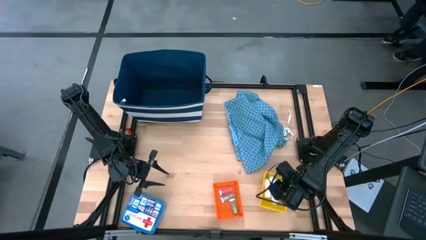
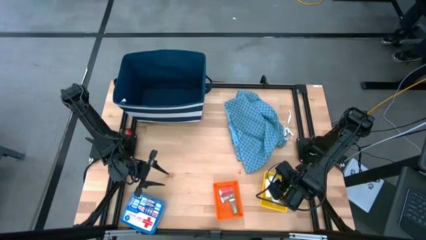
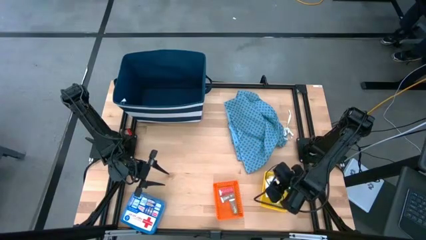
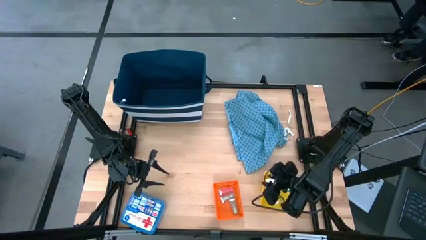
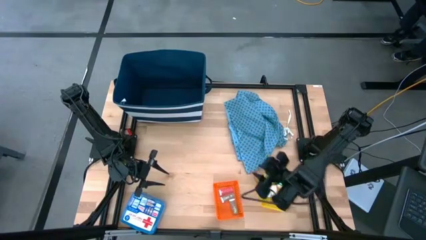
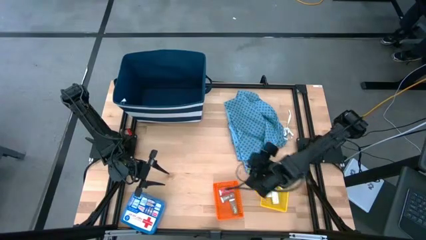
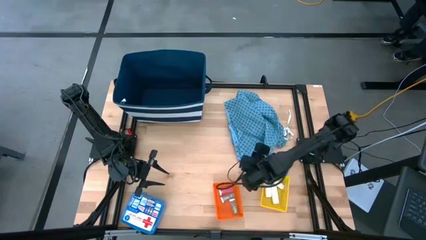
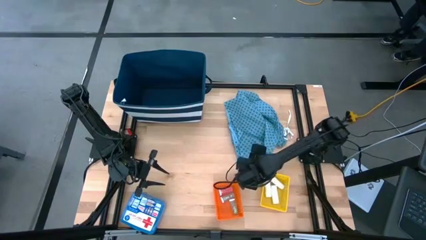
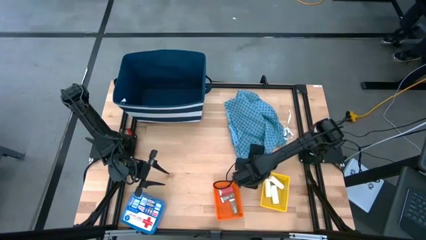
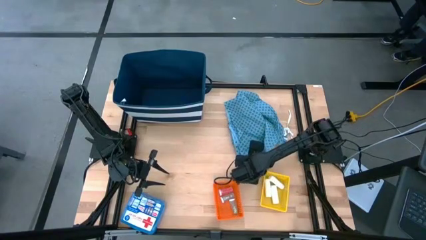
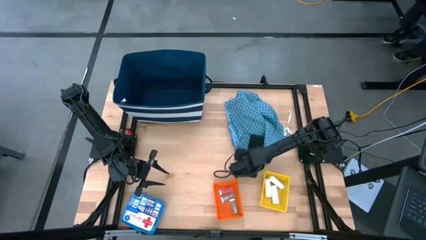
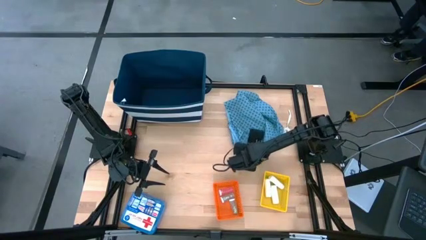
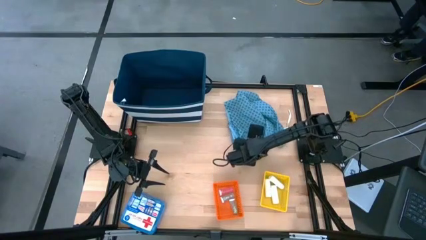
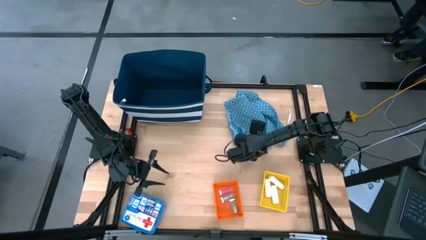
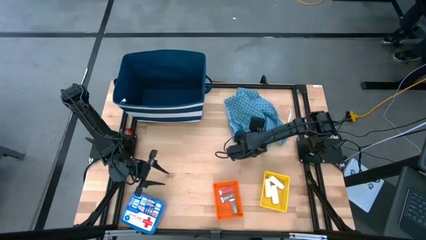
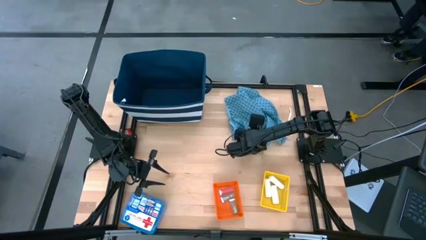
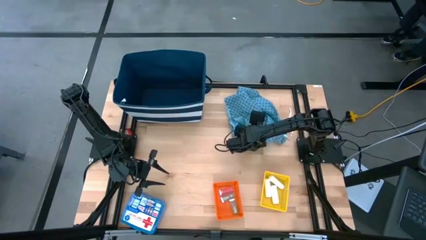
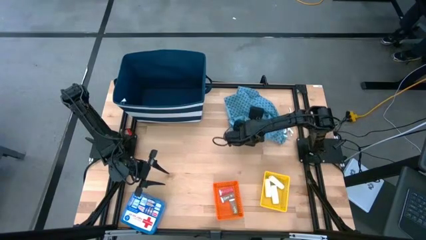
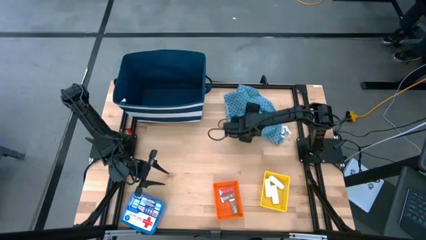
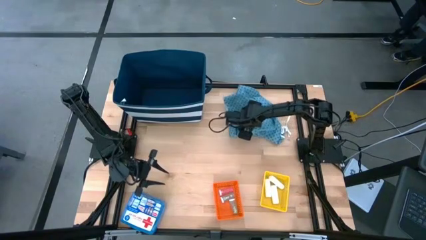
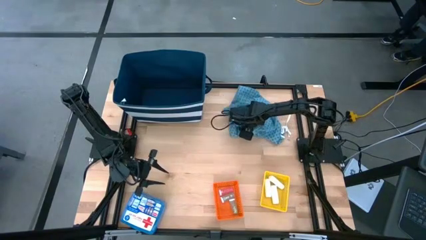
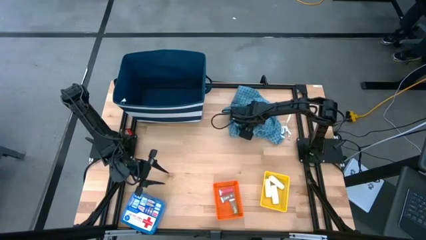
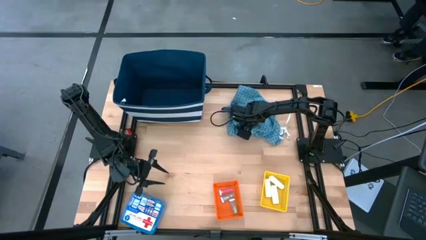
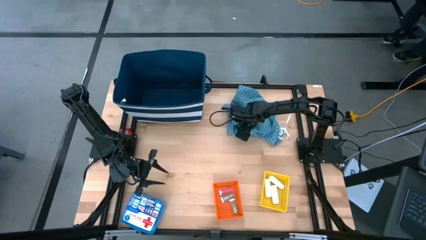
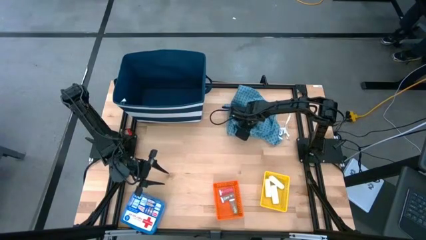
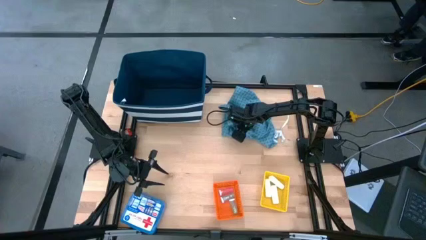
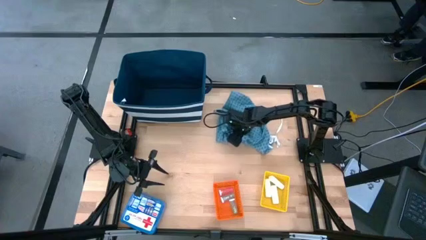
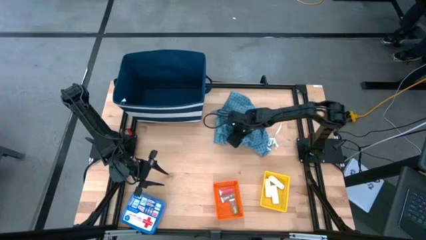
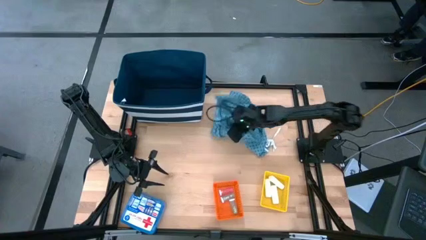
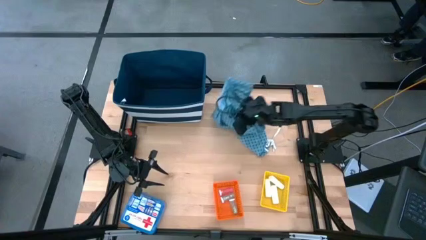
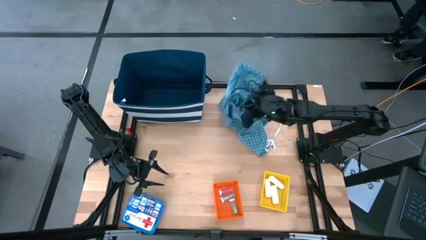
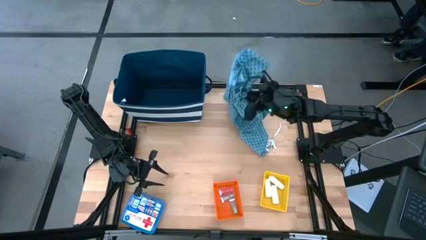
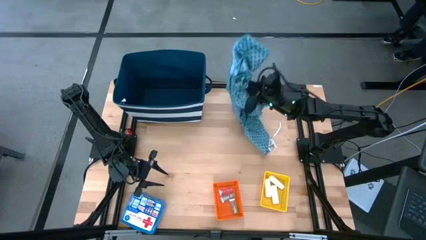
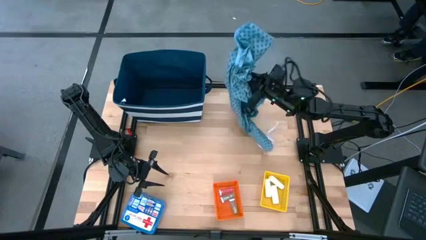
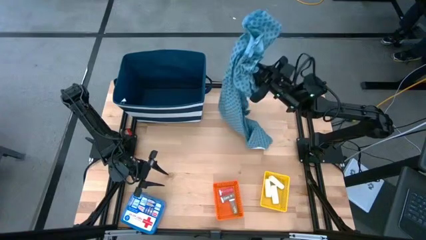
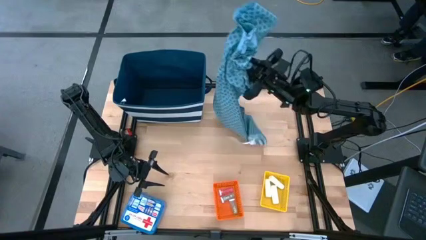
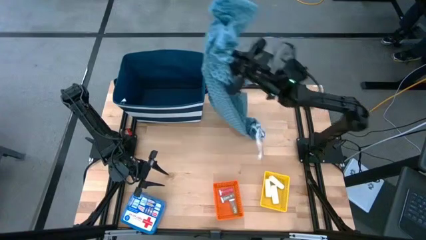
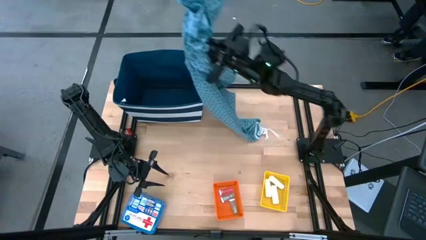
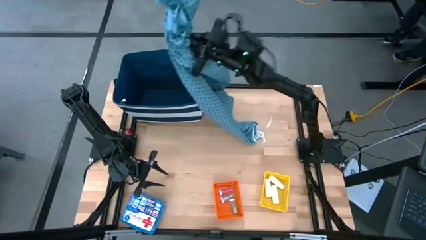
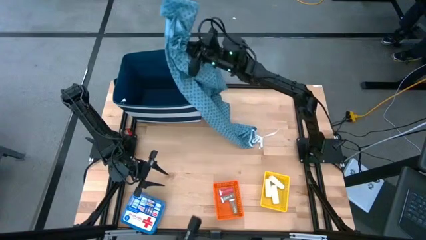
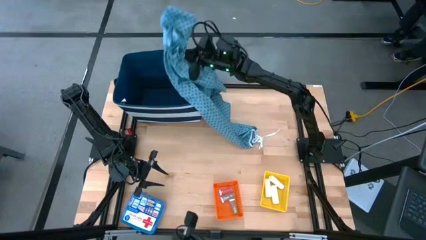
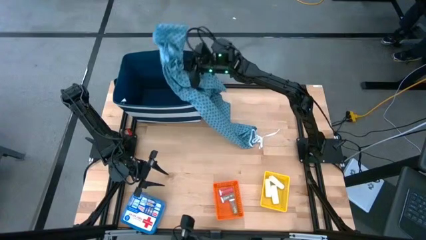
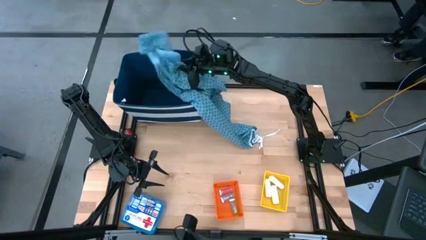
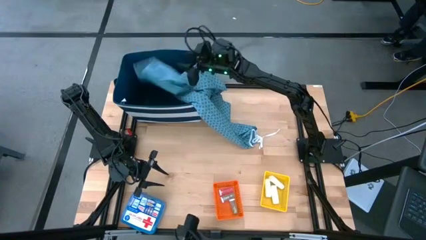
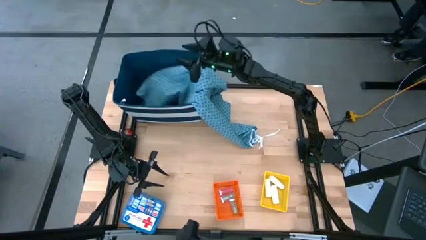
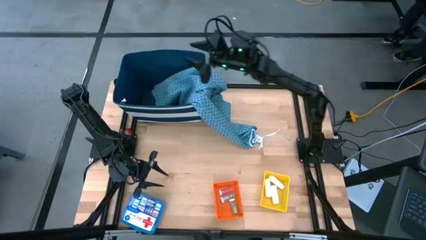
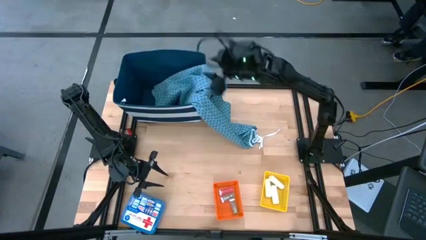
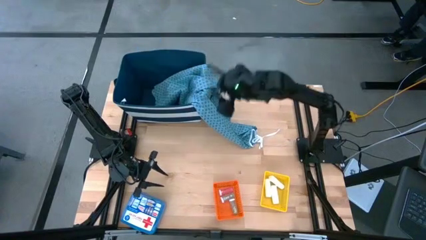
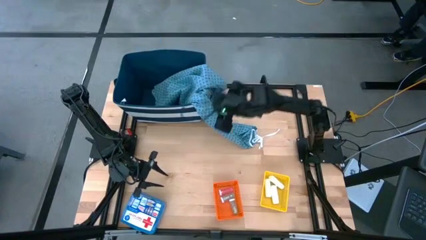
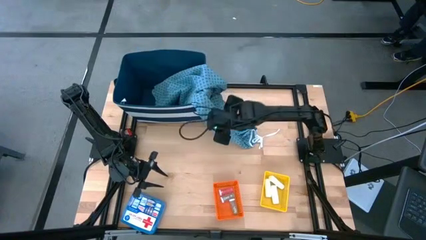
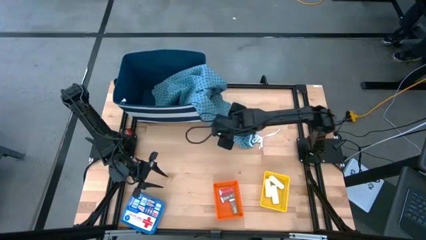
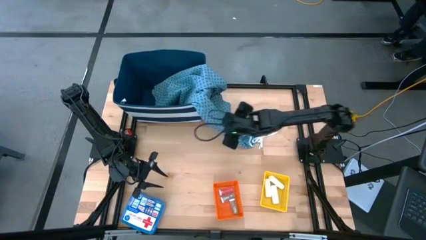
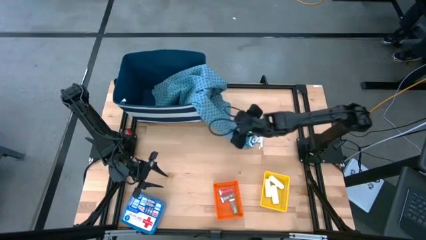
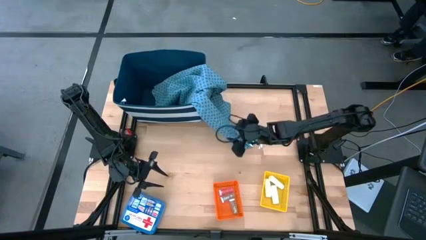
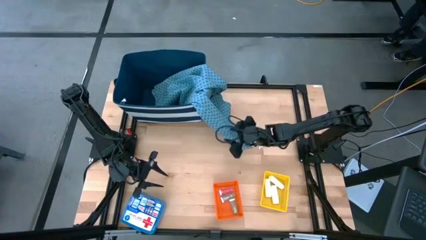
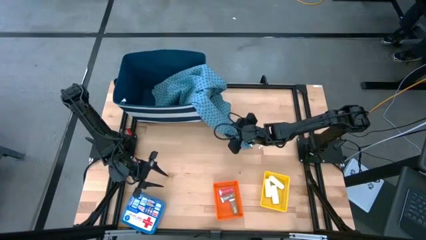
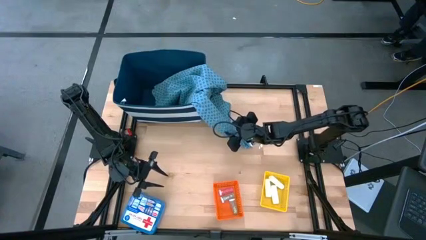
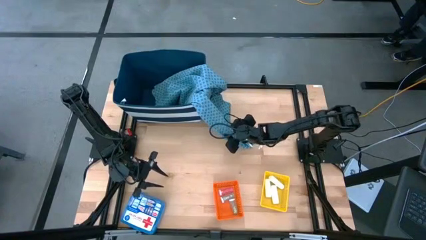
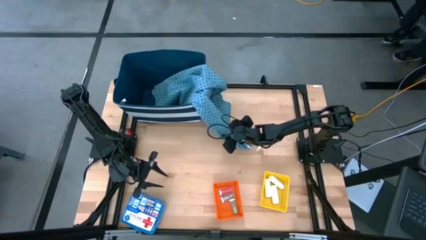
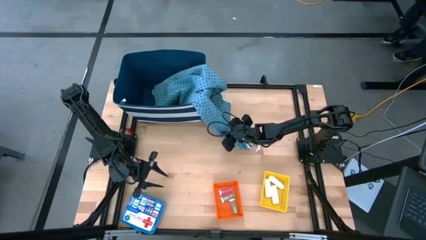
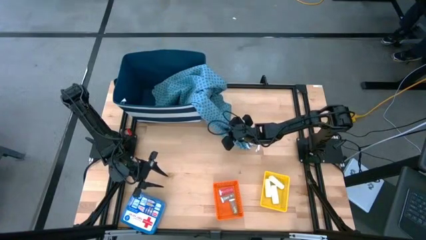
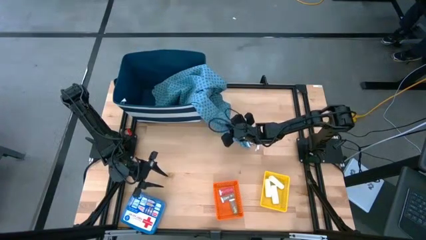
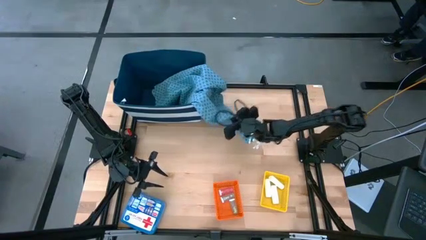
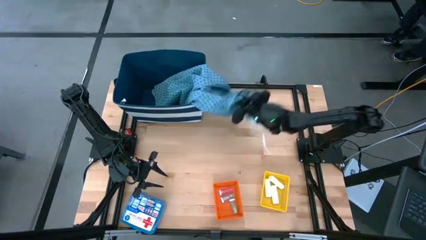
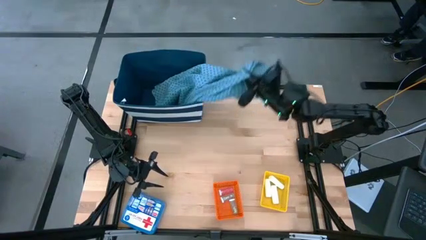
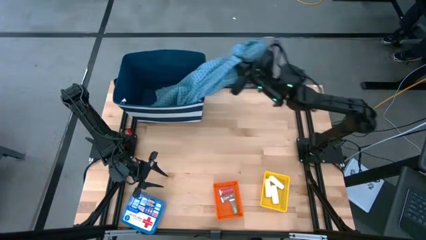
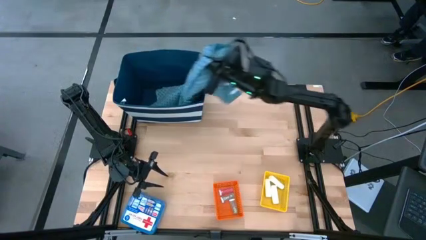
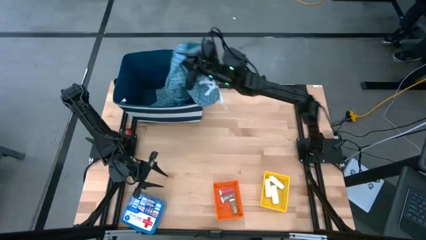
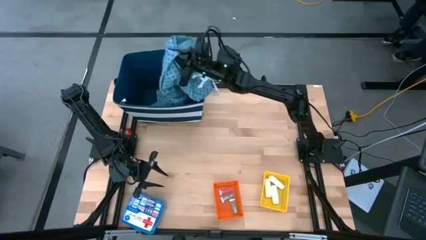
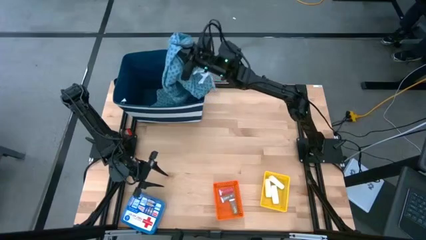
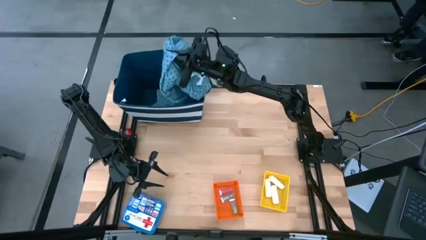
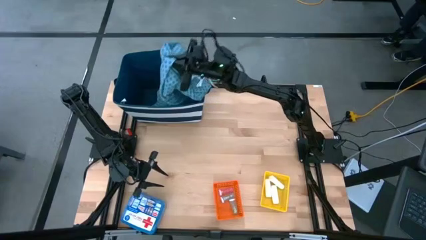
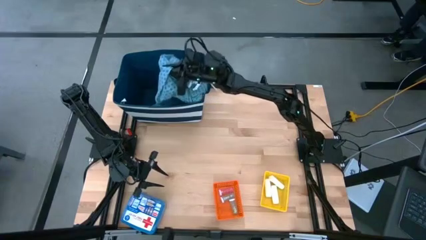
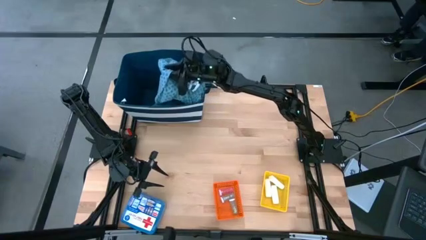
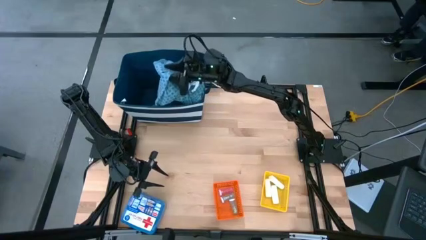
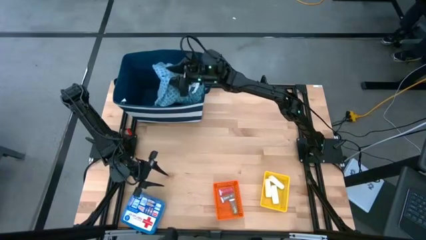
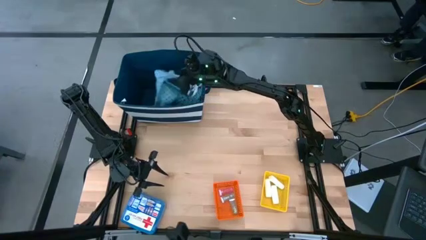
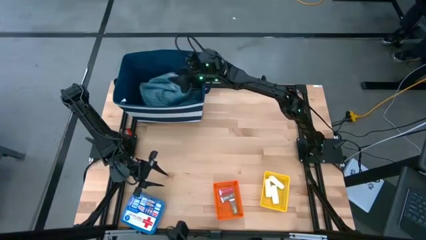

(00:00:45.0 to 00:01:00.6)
Task: Pick & Place Medicine items
Put the patient gown into the blue bin
